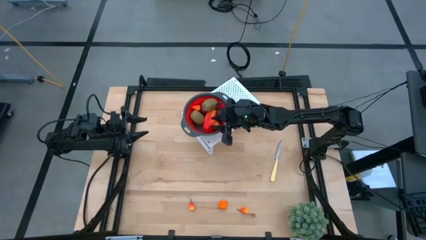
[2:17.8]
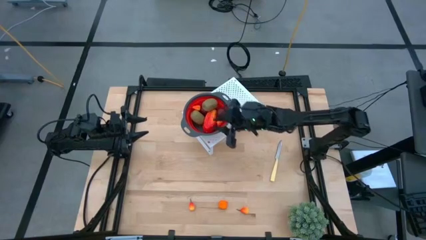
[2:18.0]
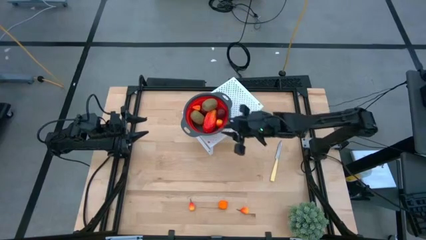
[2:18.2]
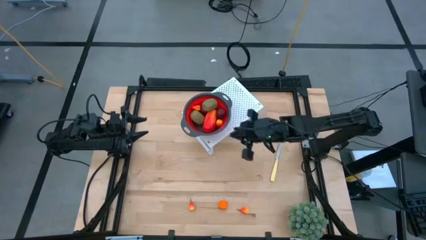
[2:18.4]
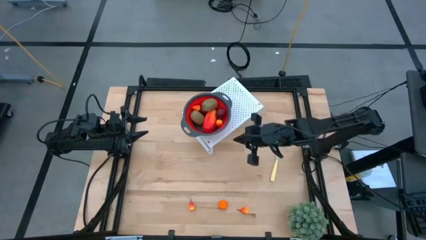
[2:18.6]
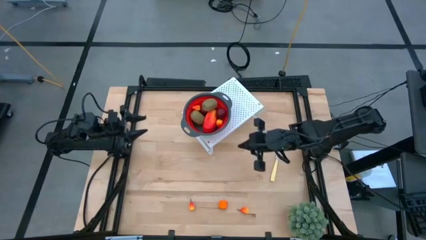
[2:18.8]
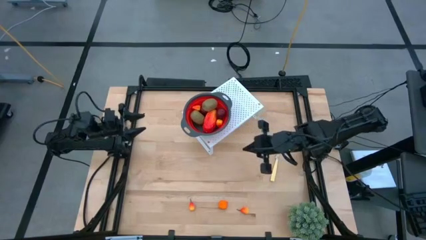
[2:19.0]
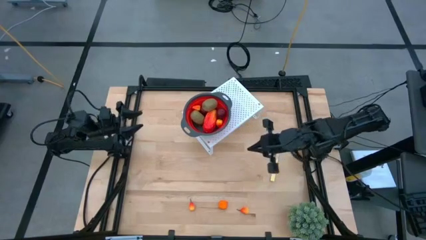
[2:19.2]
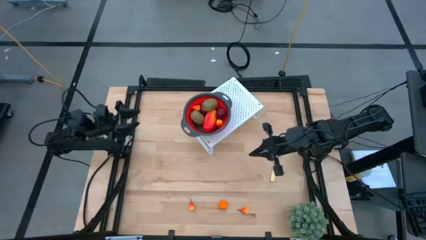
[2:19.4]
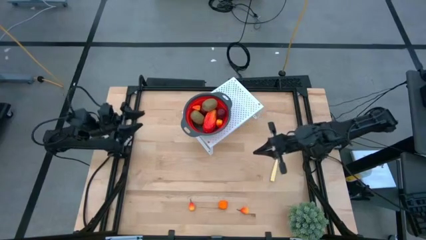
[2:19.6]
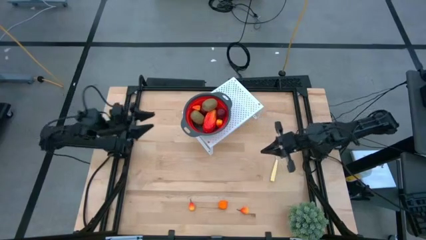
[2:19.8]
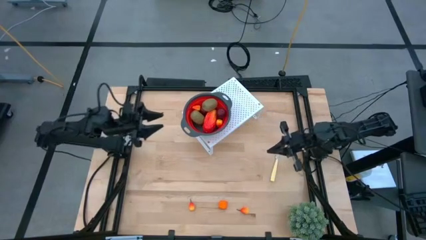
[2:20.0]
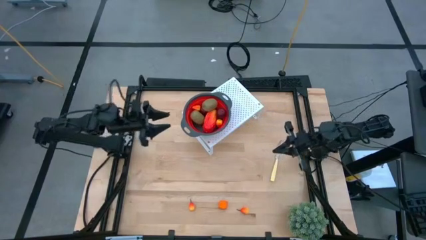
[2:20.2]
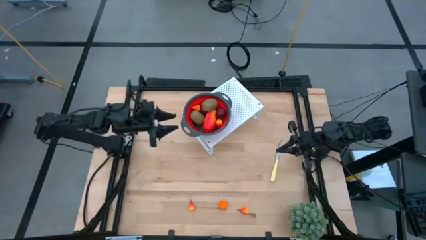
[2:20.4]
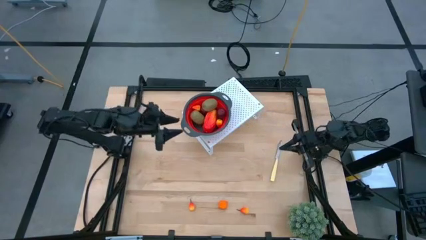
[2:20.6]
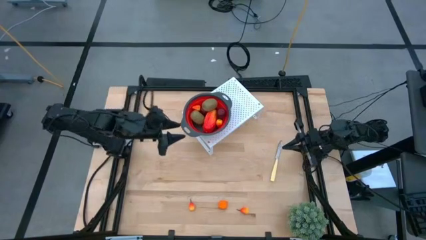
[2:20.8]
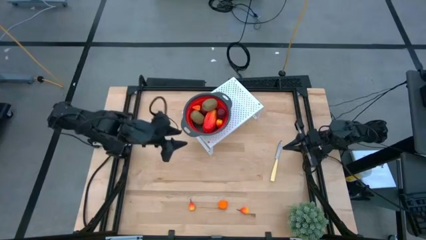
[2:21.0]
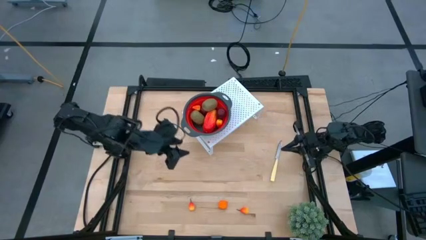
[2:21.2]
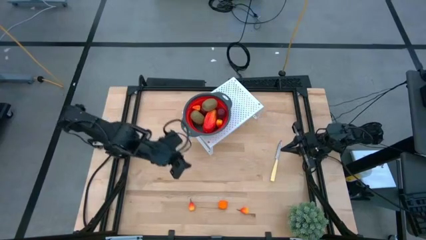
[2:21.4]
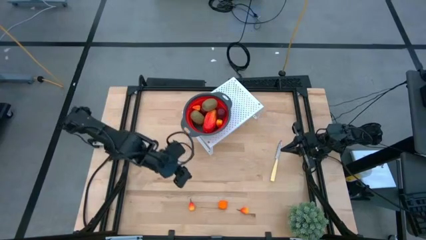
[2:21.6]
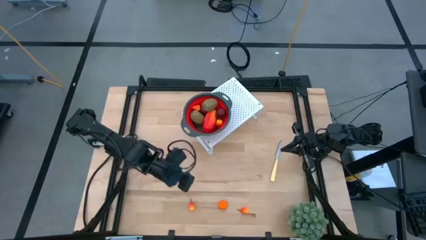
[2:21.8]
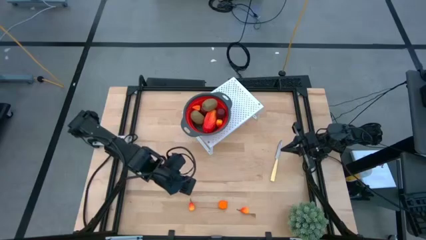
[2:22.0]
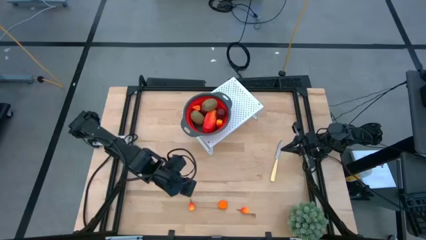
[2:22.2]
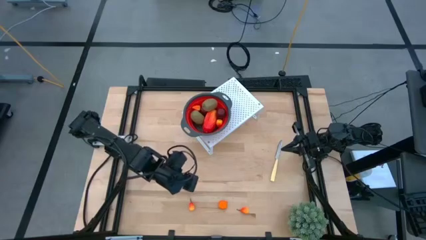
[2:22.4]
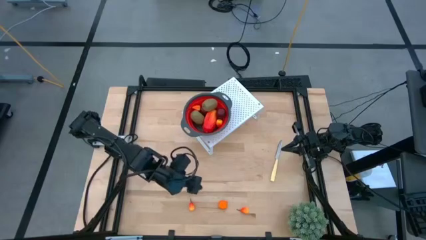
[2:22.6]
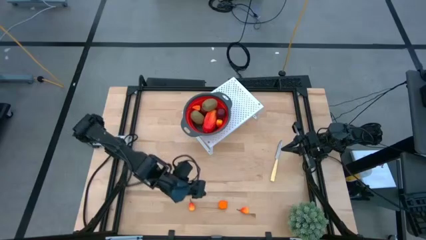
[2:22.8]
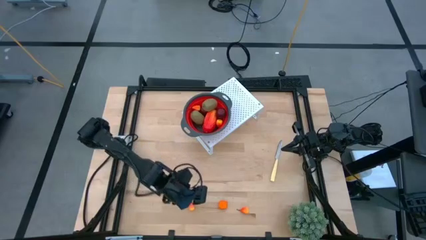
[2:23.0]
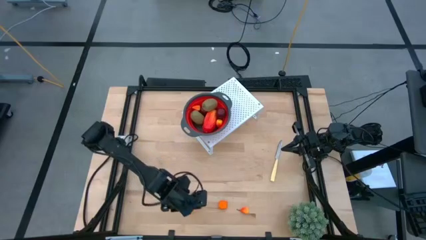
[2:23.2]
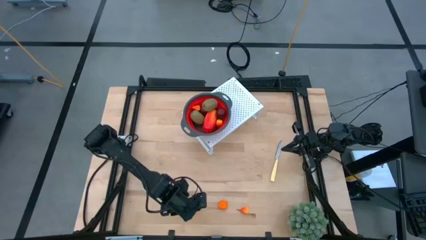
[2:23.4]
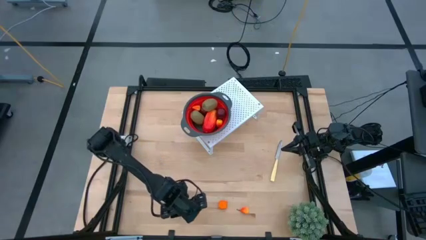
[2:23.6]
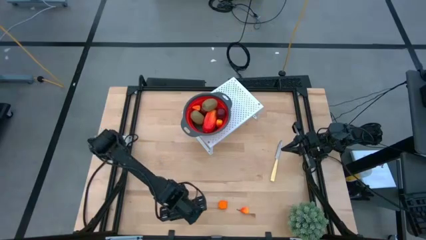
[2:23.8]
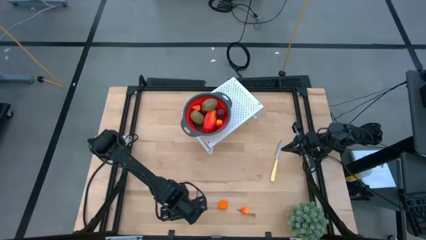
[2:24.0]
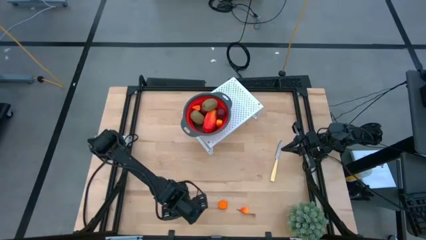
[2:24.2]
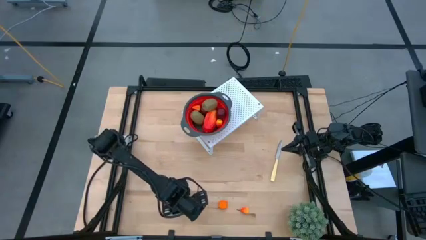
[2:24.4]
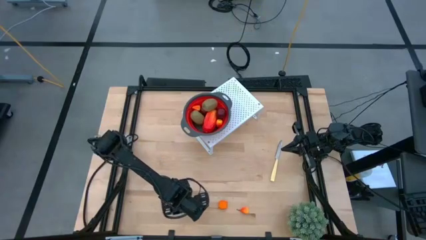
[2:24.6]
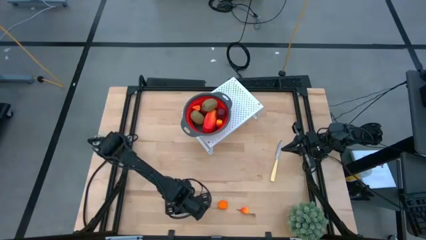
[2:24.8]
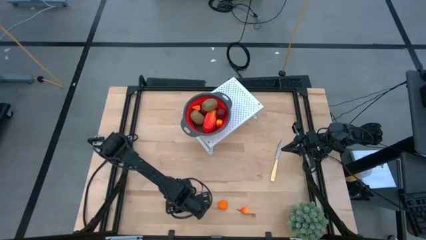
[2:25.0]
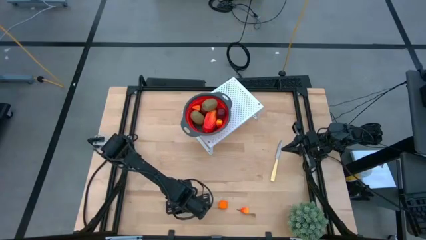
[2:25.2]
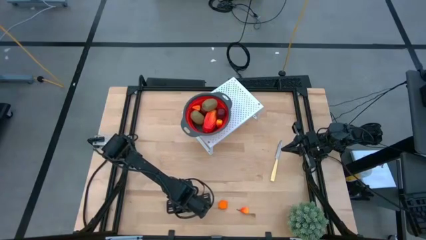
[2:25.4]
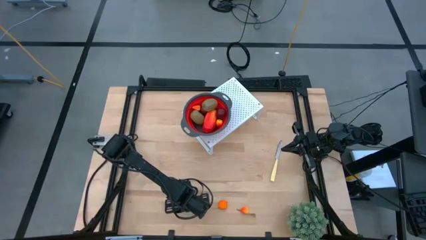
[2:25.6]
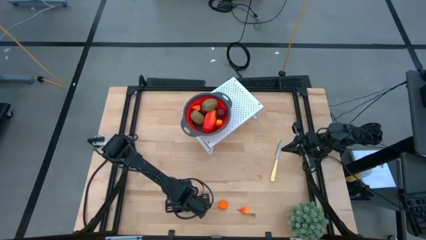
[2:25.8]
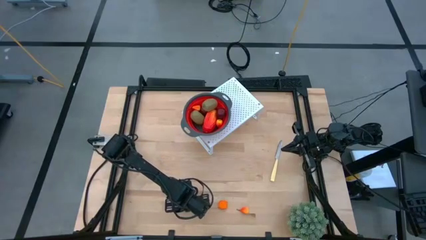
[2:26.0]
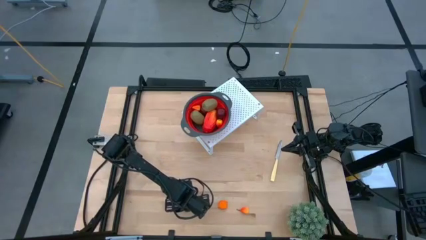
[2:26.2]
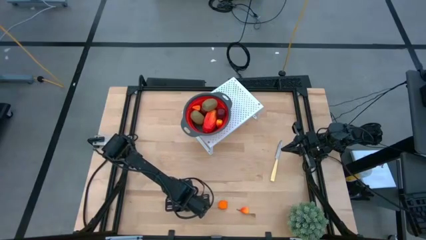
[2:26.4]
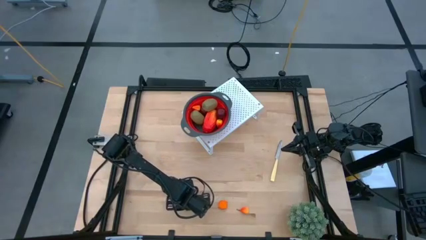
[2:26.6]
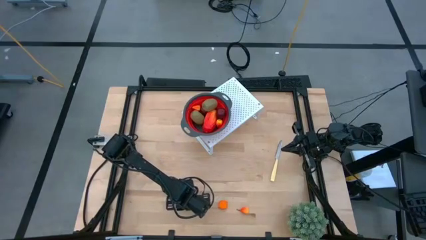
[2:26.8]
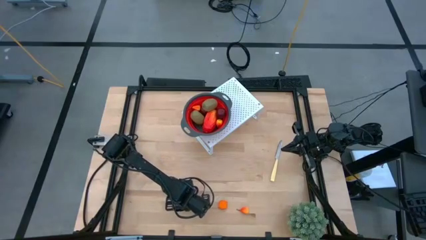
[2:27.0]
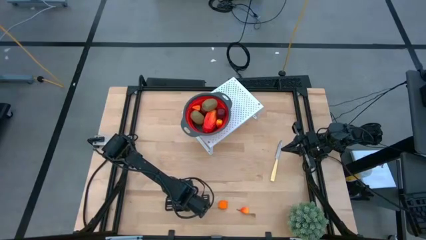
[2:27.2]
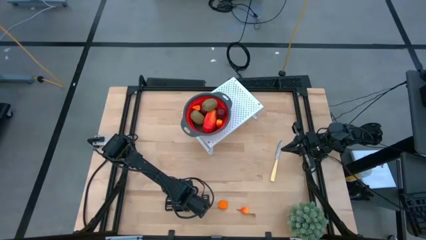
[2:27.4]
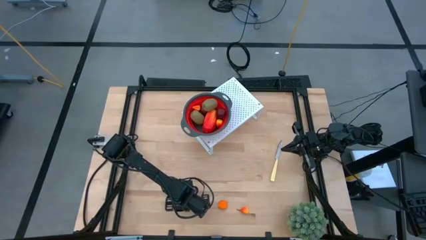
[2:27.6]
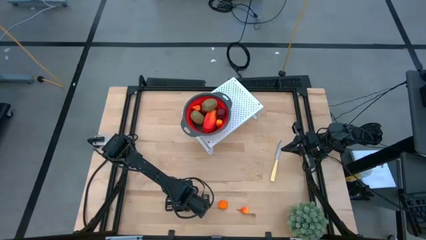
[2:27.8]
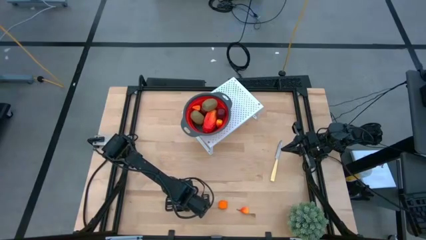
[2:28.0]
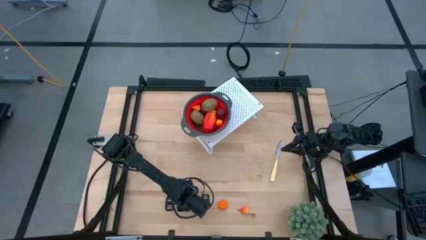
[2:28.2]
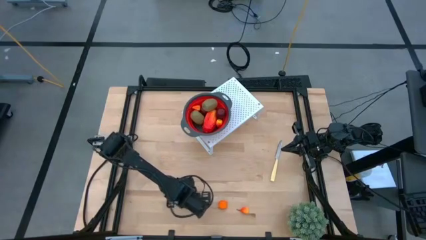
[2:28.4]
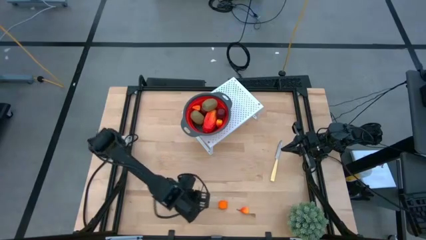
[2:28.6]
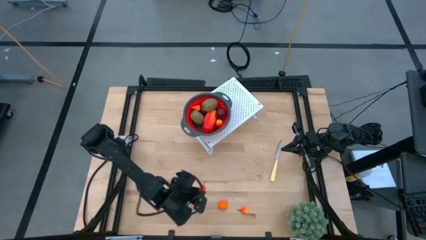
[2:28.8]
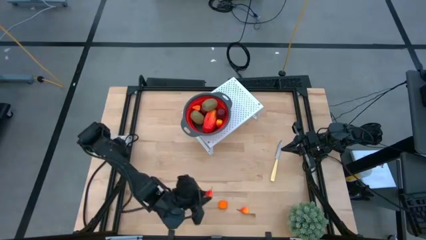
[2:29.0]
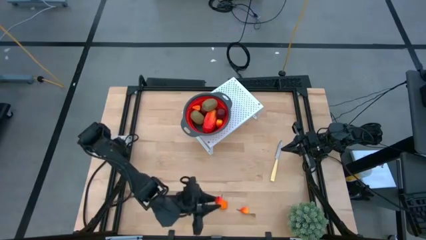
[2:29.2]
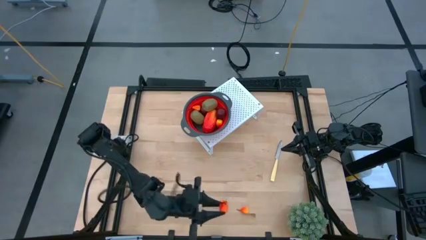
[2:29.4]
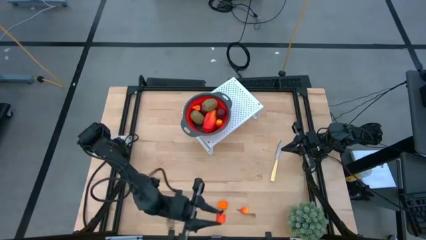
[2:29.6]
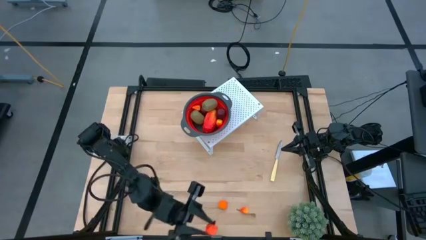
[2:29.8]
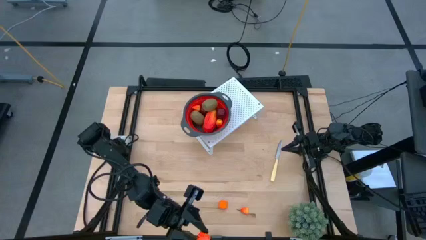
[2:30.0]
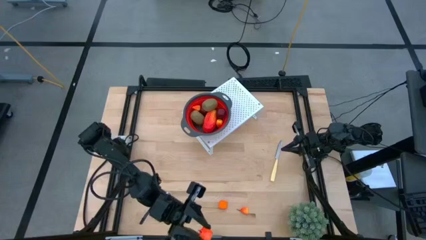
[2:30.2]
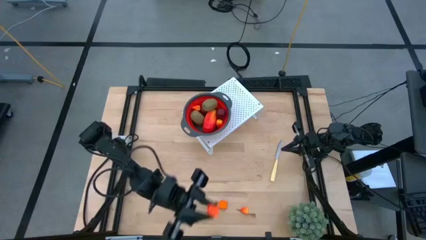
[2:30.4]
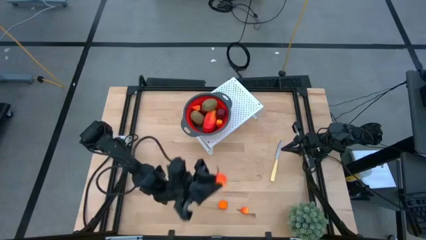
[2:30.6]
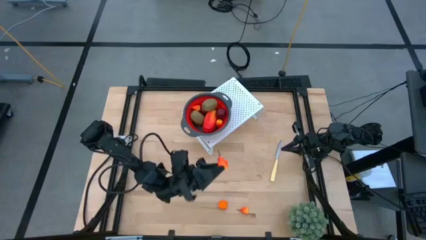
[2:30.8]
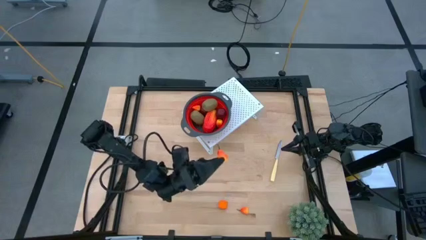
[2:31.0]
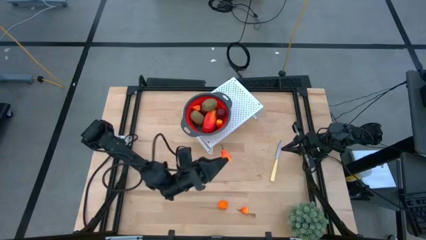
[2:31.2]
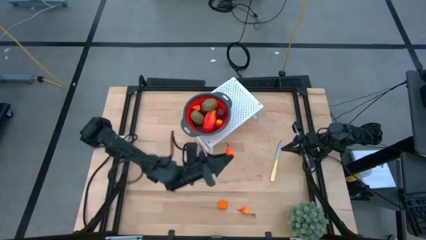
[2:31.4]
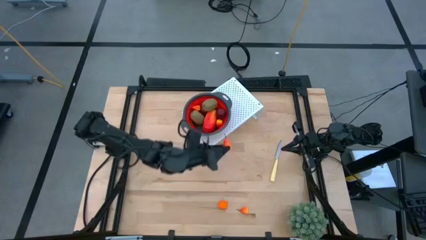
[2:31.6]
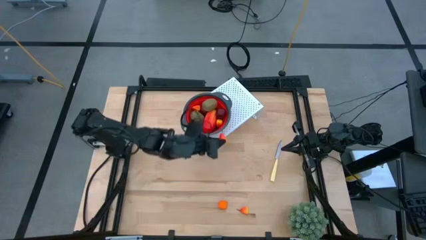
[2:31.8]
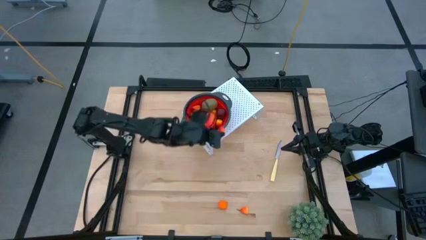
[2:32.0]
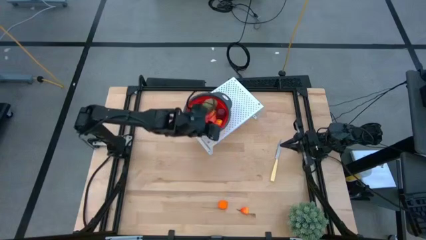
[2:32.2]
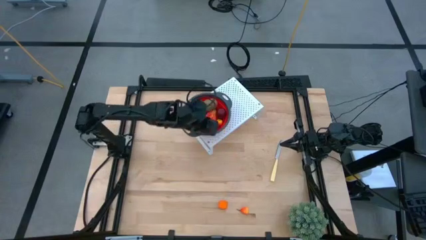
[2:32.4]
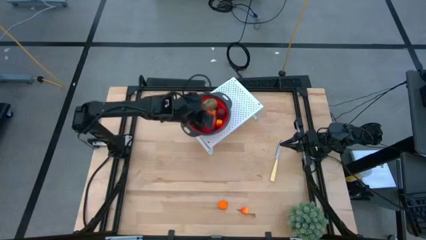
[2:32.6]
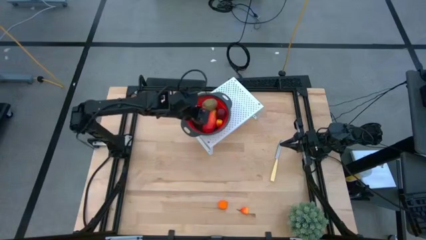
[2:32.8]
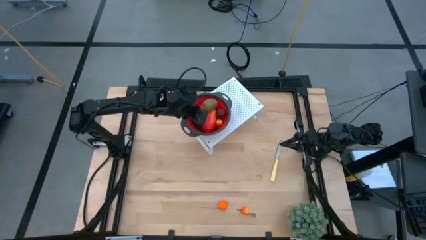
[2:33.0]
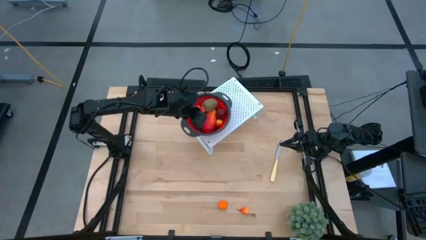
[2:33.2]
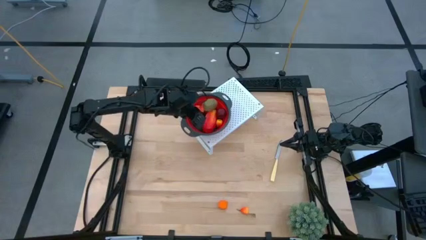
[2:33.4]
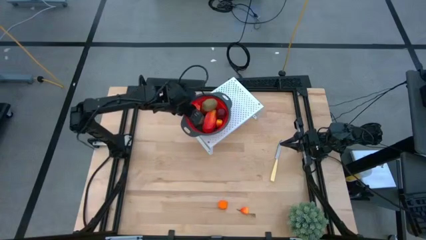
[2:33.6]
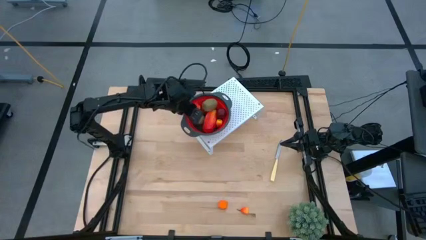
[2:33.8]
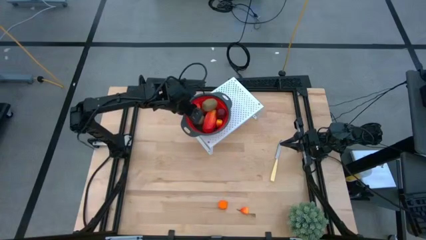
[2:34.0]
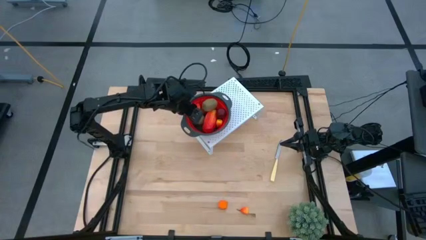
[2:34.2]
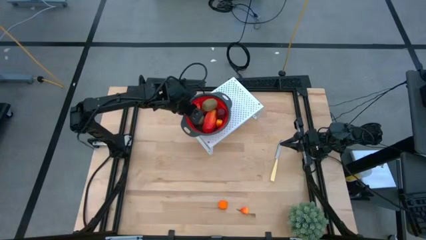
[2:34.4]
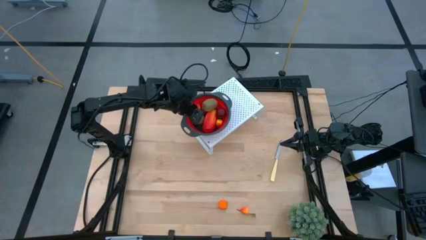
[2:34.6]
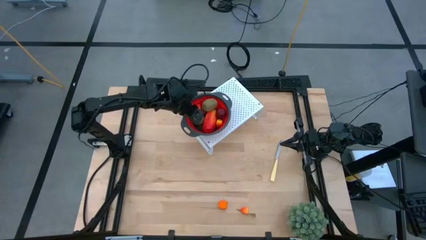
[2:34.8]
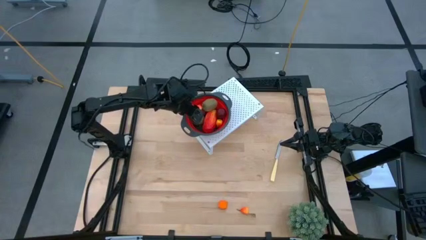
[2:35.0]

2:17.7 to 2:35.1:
Task: Pick & Place Fruit
Put the left peach into the red strainer bowl on the shelf
